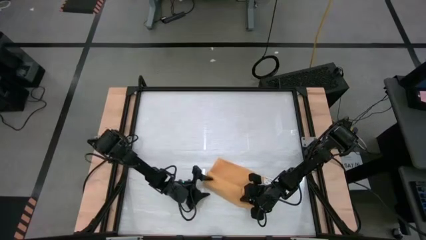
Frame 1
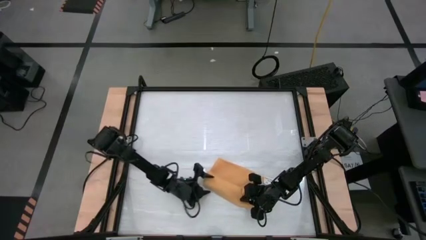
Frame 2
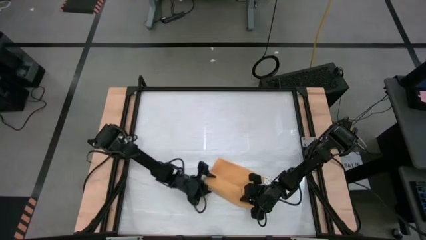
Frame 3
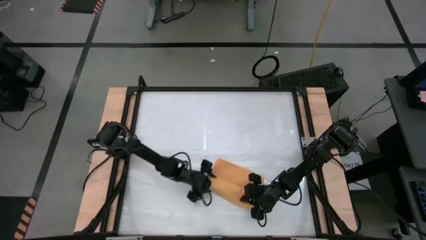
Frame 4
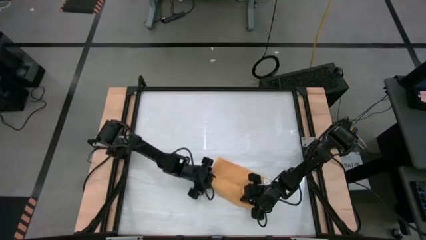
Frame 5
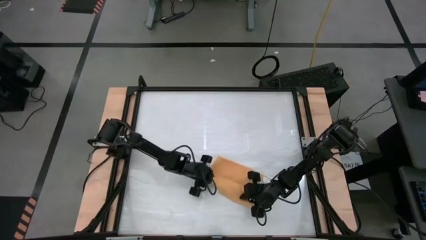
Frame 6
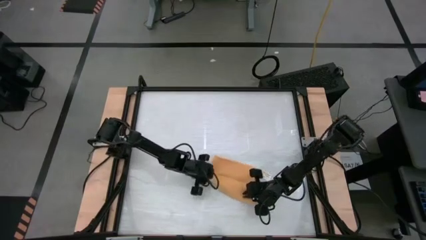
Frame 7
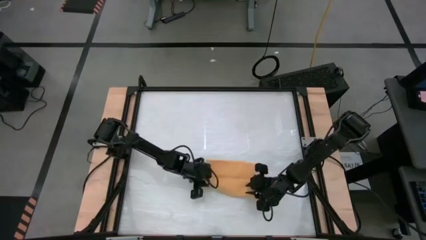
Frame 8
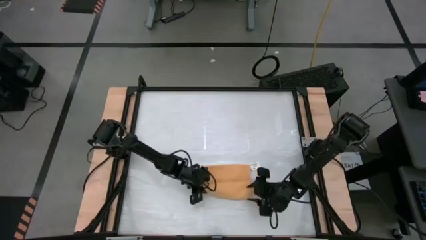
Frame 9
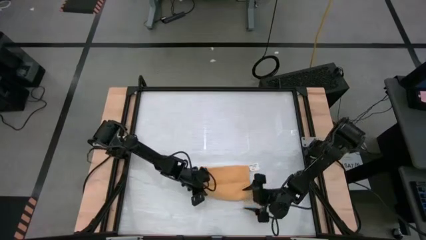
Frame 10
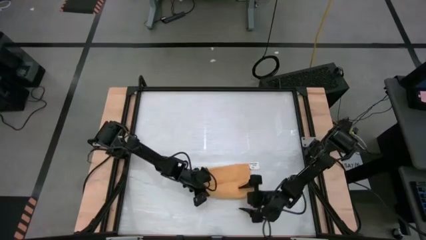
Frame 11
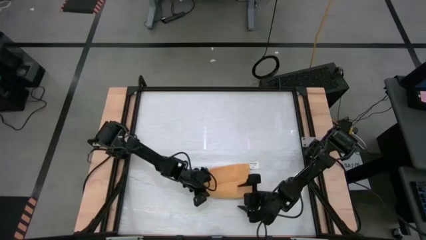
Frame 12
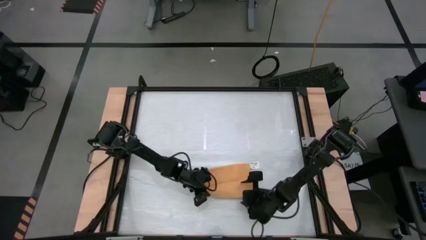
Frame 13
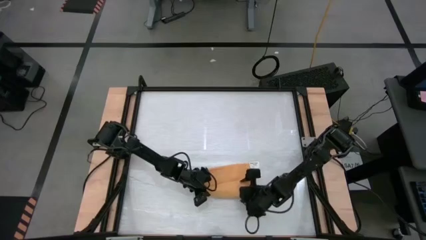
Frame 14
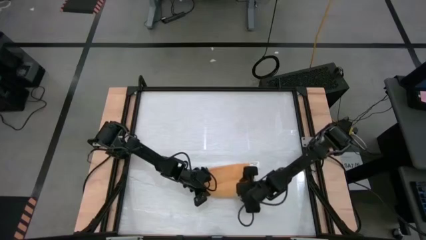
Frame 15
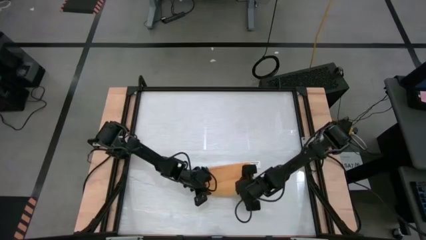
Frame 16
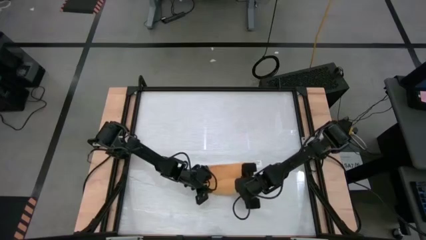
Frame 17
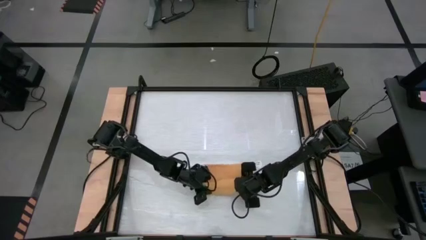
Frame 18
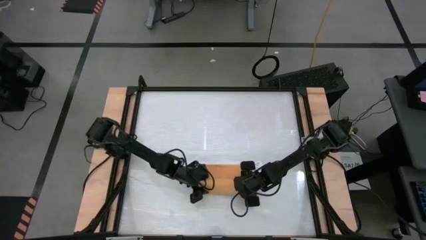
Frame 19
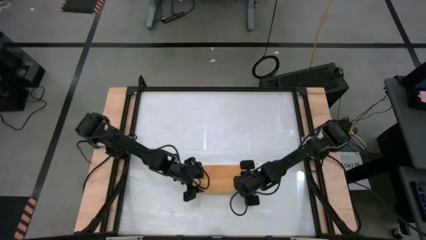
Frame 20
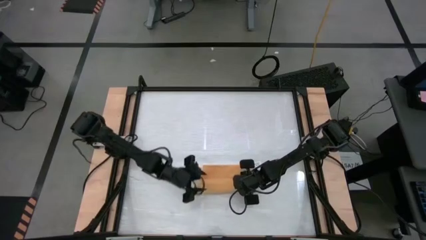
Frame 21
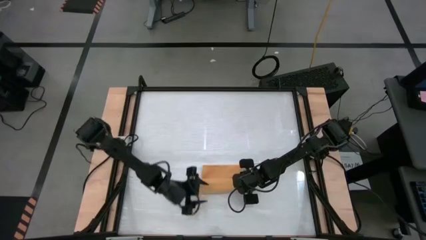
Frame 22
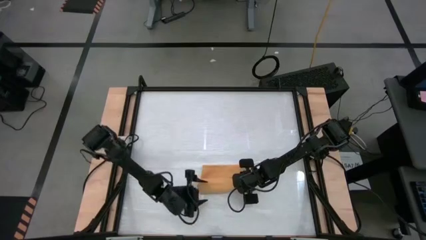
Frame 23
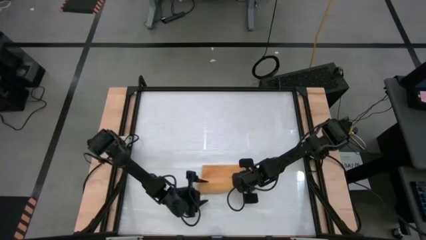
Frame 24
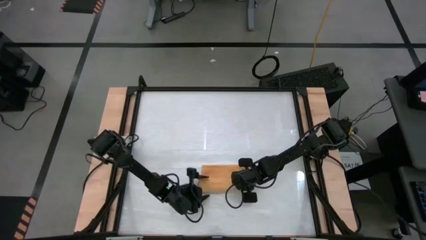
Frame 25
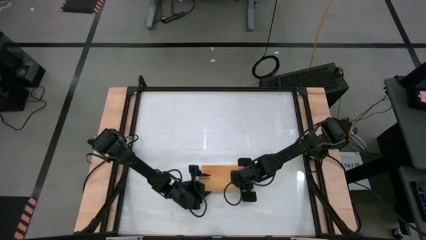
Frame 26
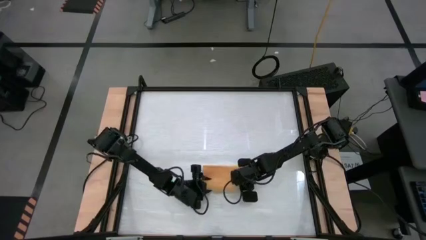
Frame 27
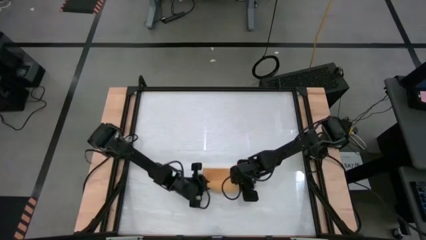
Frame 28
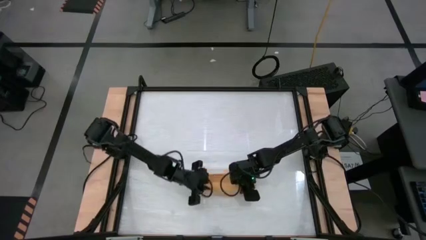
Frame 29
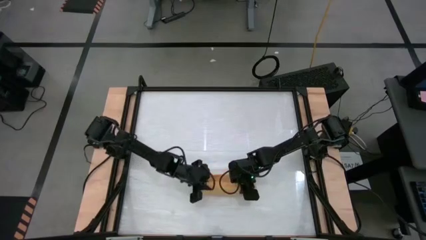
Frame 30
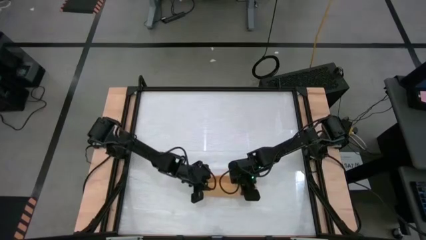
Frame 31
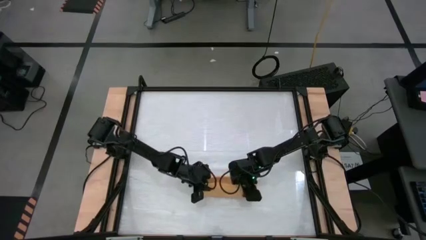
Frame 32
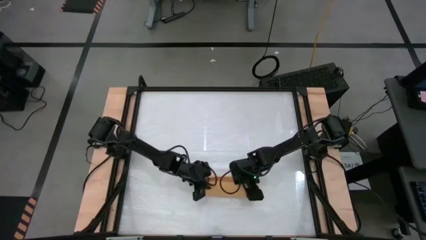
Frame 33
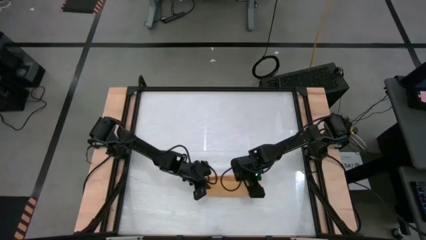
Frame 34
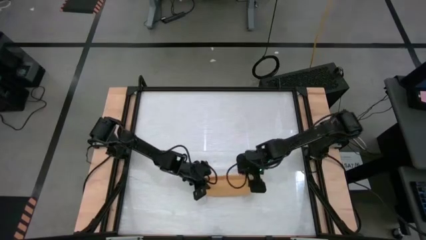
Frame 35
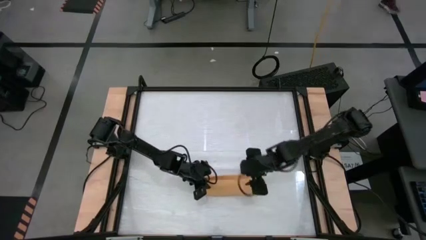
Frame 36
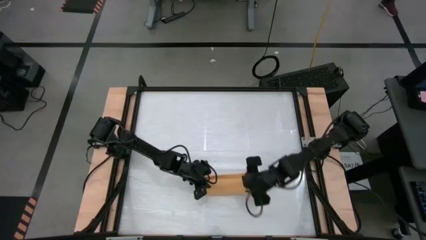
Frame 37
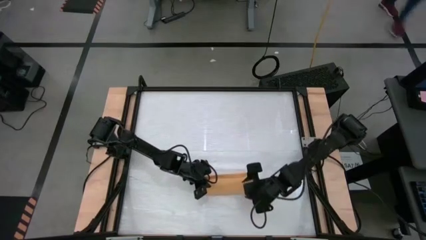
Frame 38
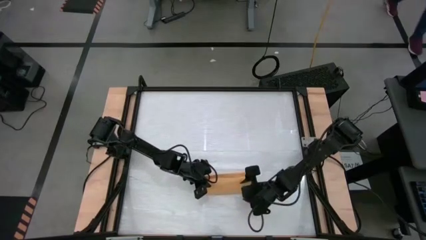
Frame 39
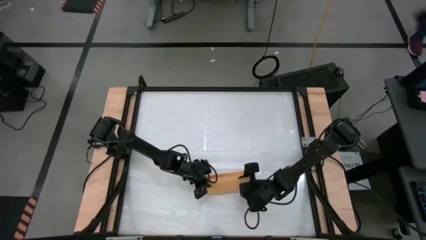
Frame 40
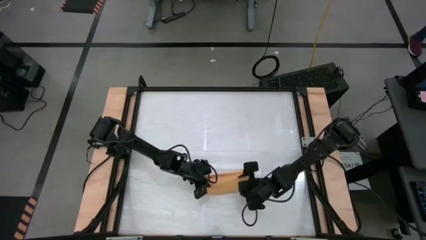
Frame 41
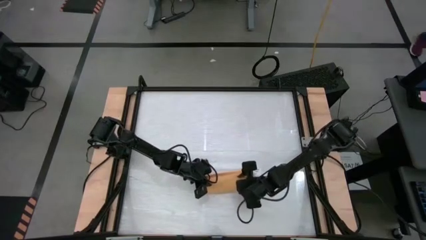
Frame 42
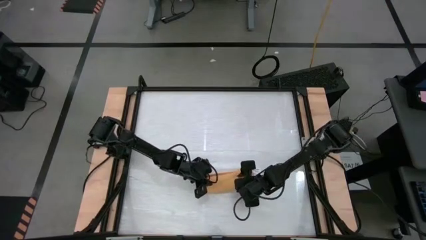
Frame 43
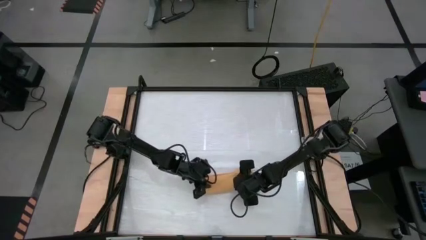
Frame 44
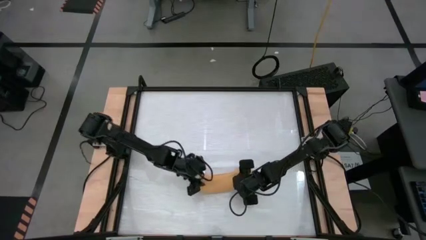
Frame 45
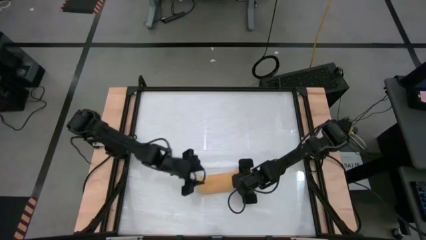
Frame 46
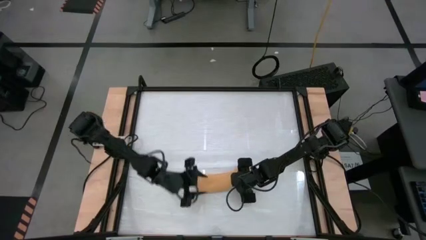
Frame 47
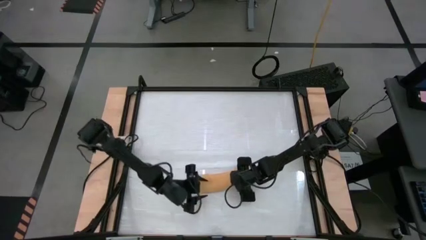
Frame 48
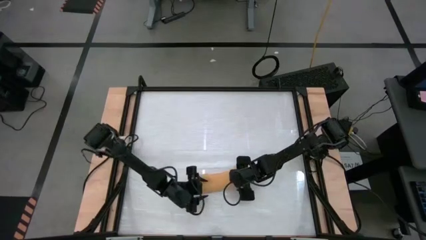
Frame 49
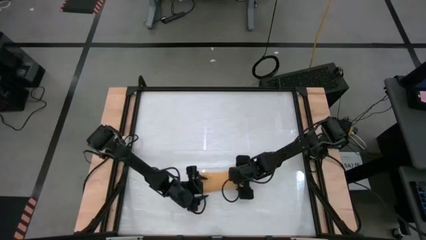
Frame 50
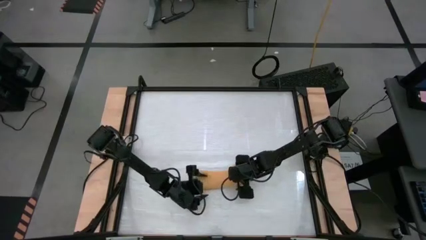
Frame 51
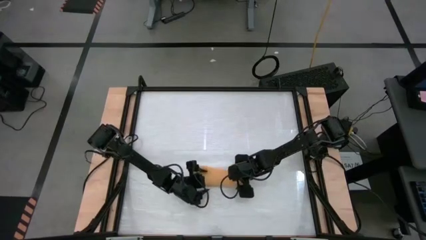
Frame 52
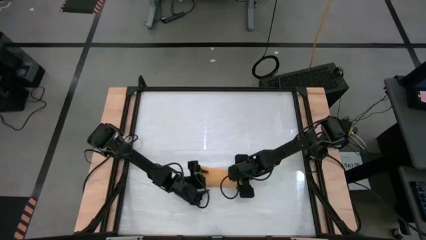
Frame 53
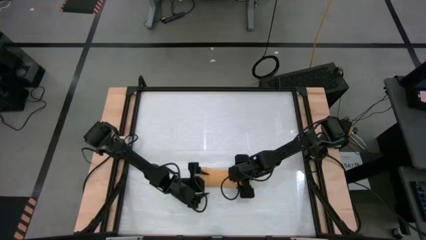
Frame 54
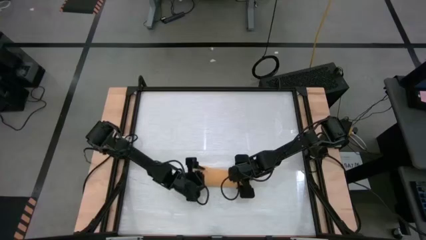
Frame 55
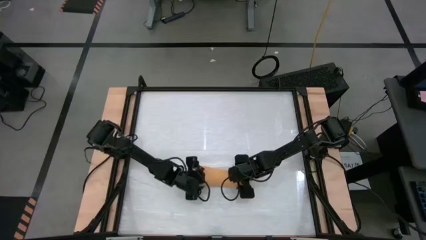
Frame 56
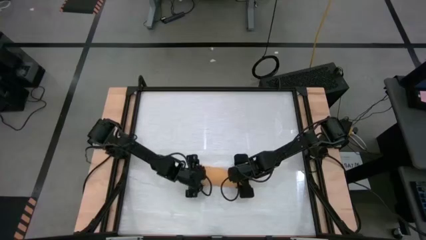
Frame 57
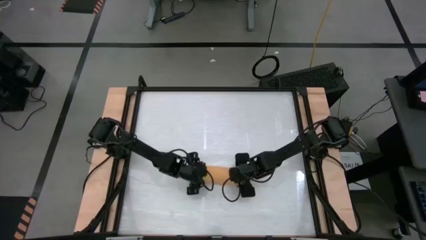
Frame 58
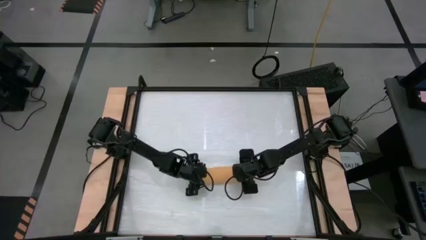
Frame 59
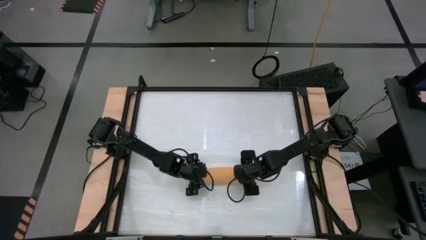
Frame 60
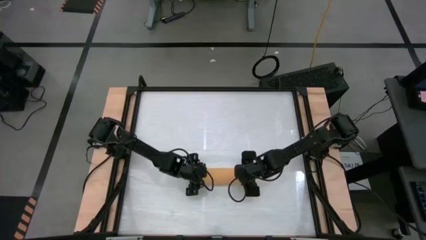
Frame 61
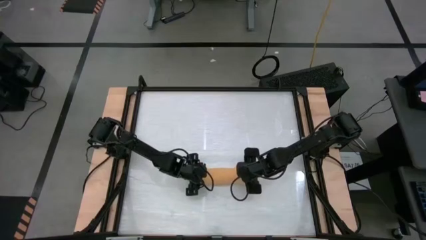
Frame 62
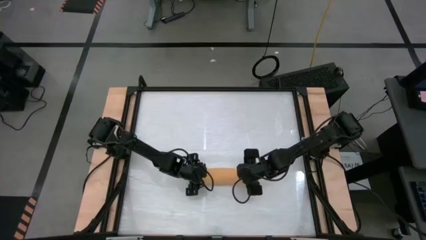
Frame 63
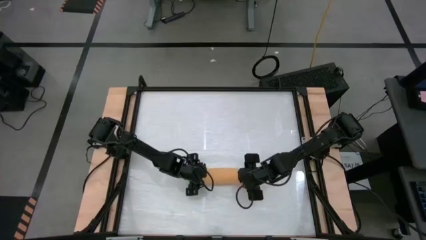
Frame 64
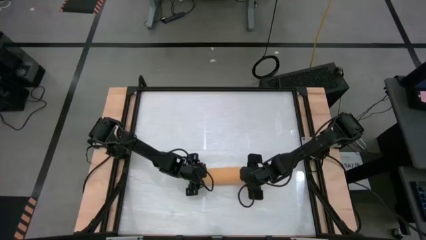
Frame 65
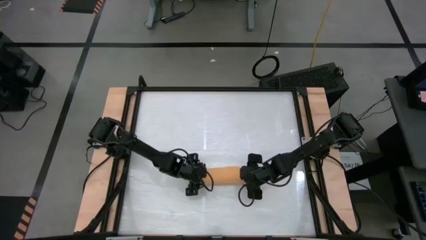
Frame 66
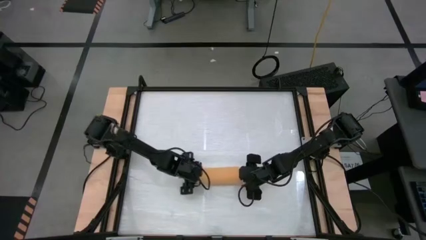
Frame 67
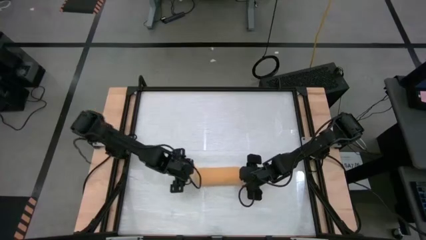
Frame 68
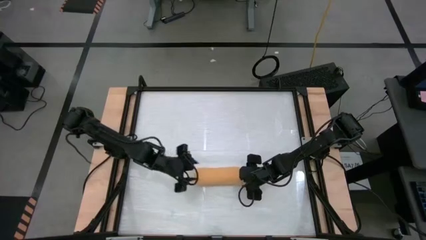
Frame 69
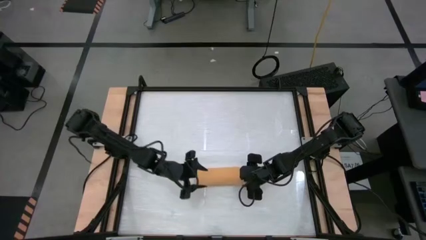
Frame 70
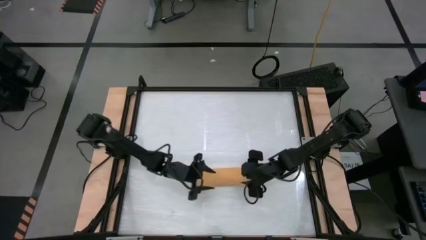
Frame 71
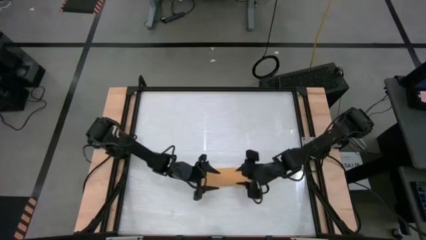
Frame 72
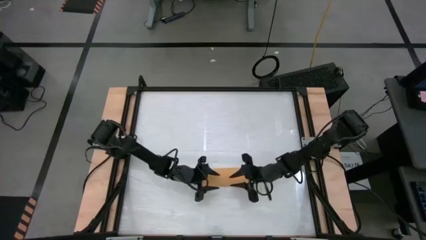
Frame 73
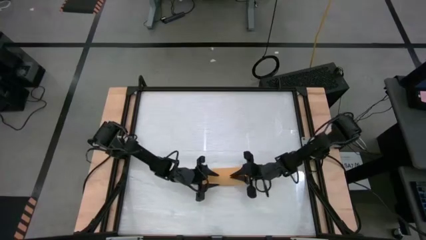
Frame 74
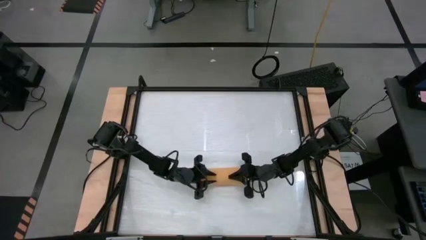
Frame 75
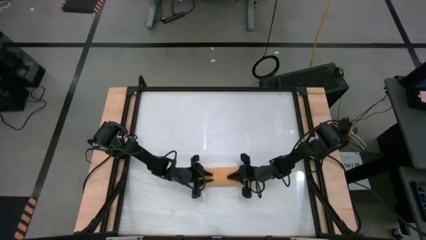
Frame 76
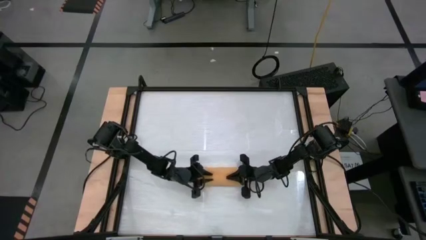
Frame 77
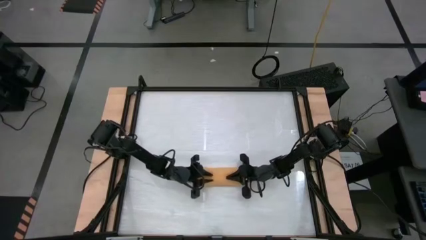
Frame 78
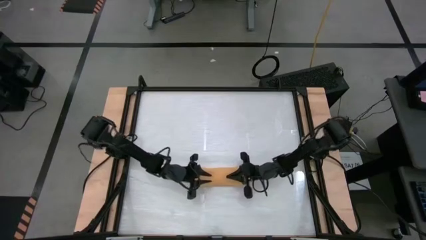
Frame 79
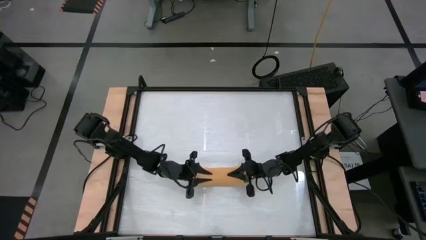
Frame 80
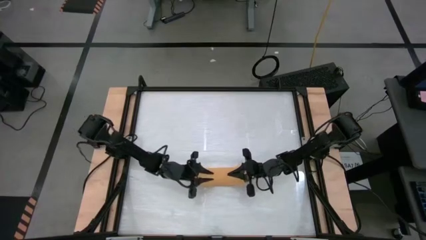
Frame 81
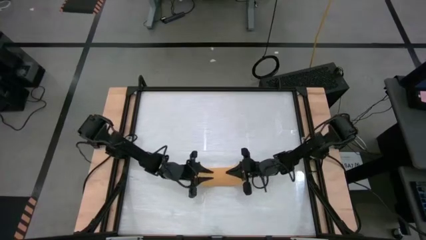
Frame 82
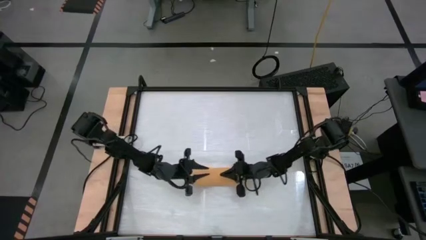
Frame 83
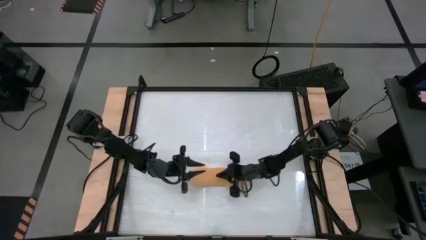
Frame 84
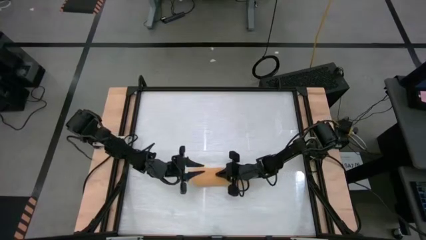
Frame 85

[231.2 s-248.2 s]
Task: Roll towel into tight, uniform cylinder
Roll the yellow towel
